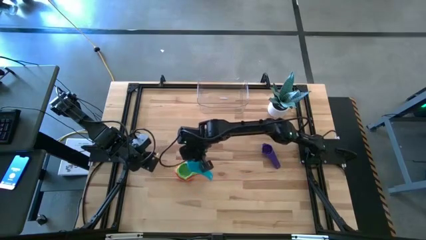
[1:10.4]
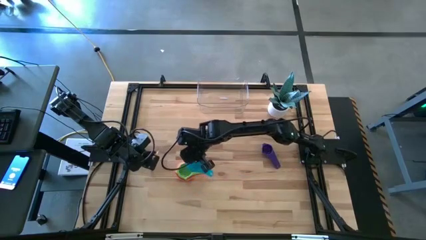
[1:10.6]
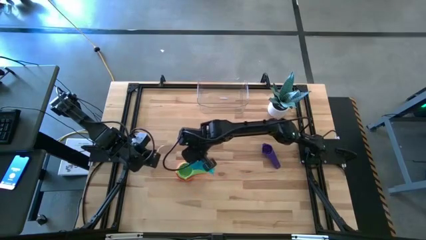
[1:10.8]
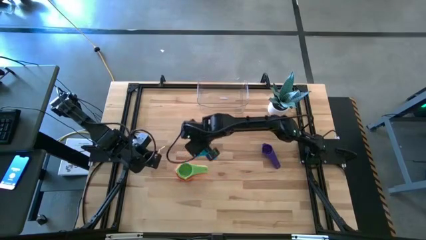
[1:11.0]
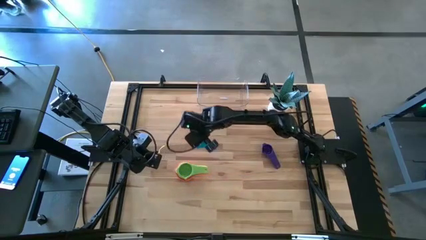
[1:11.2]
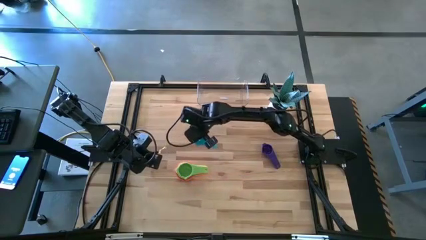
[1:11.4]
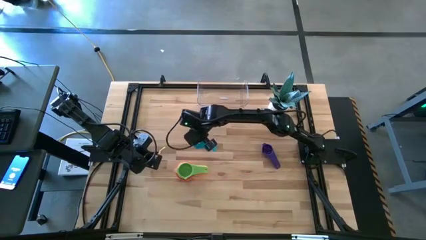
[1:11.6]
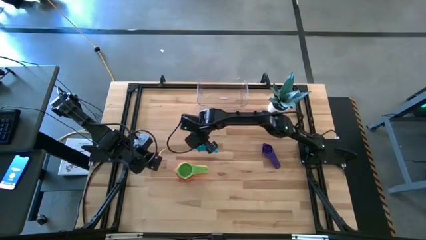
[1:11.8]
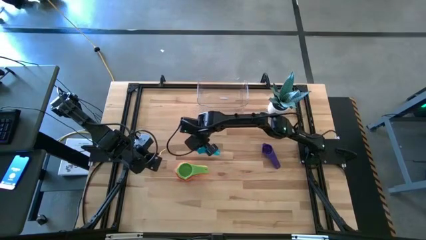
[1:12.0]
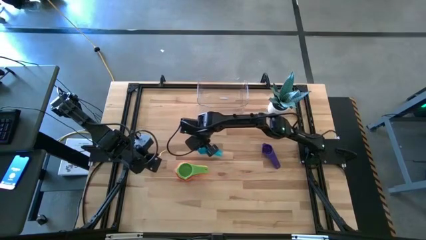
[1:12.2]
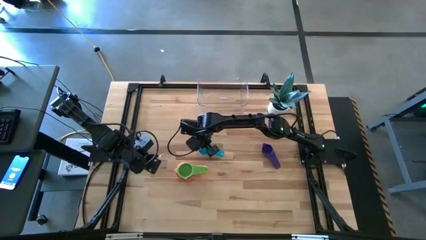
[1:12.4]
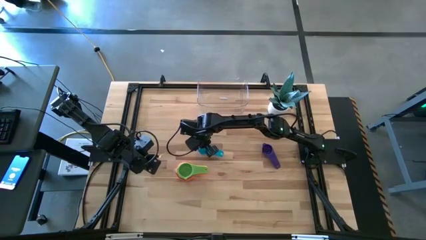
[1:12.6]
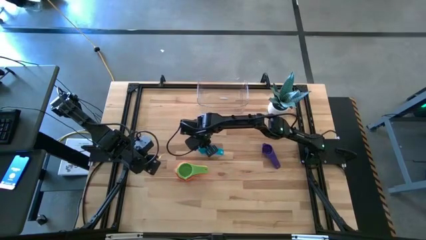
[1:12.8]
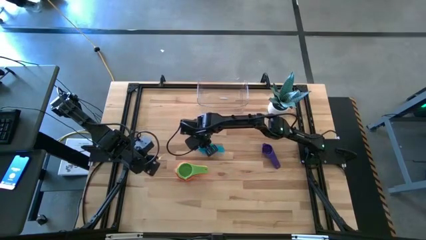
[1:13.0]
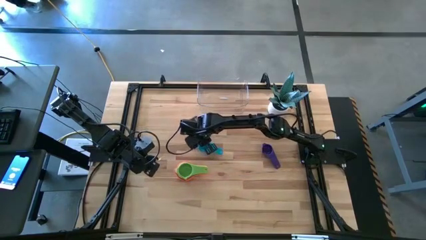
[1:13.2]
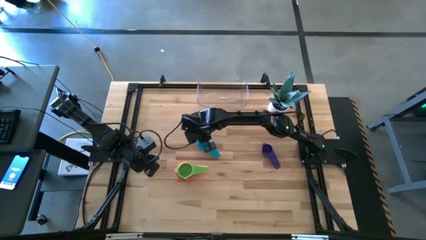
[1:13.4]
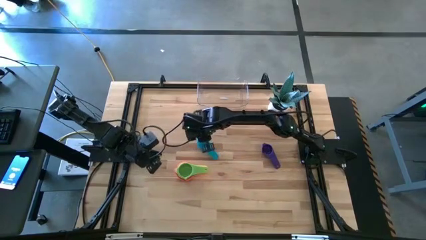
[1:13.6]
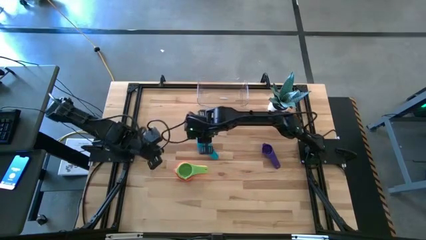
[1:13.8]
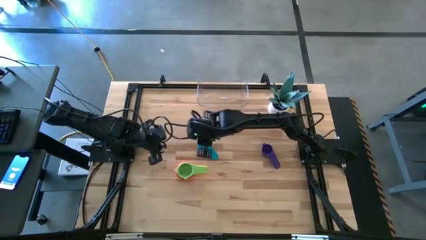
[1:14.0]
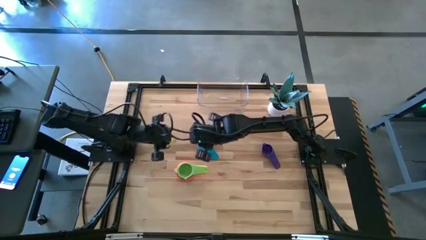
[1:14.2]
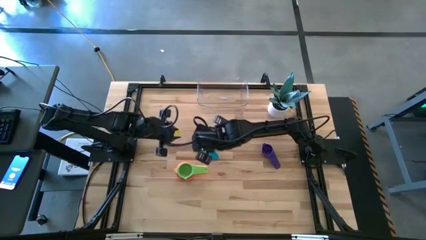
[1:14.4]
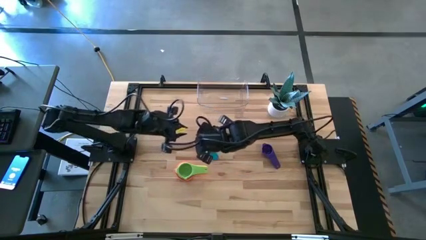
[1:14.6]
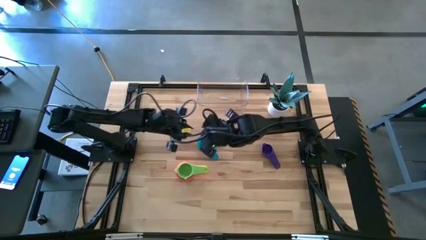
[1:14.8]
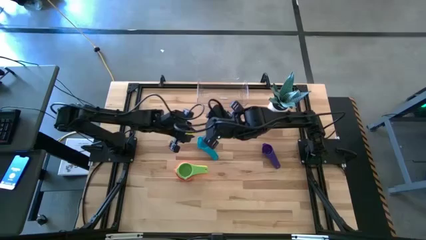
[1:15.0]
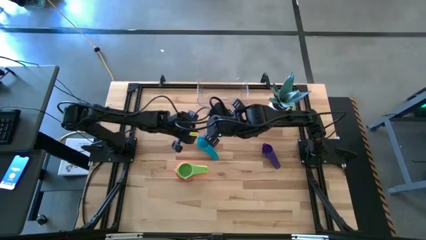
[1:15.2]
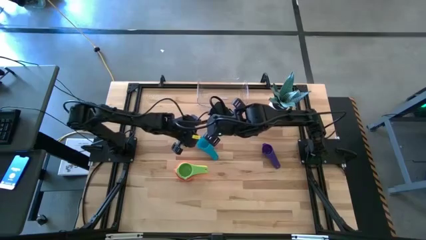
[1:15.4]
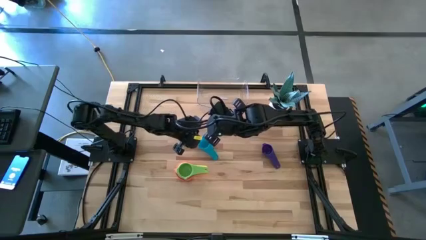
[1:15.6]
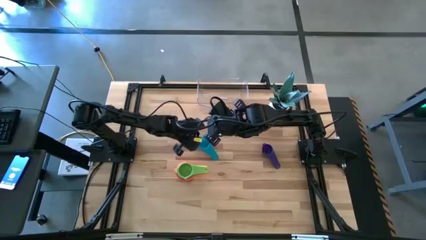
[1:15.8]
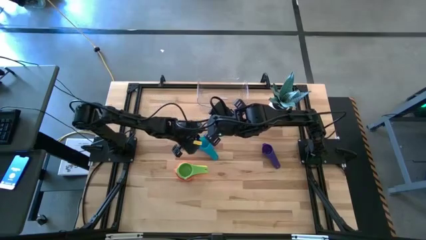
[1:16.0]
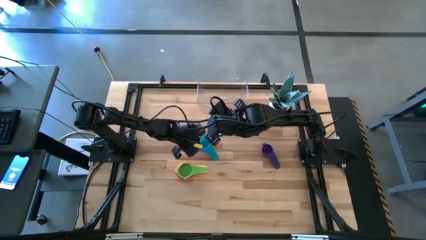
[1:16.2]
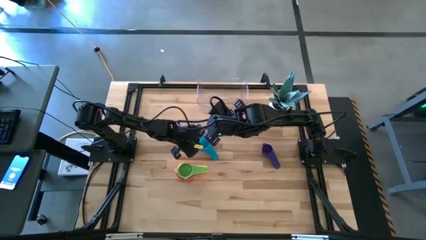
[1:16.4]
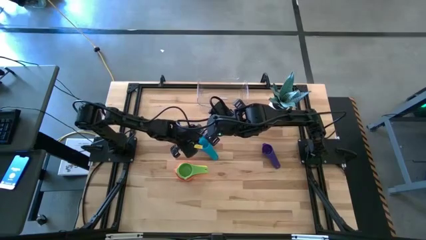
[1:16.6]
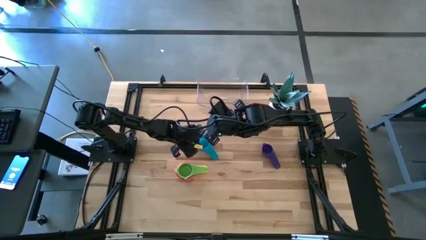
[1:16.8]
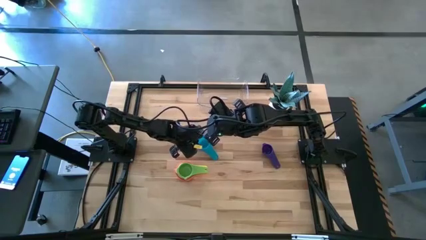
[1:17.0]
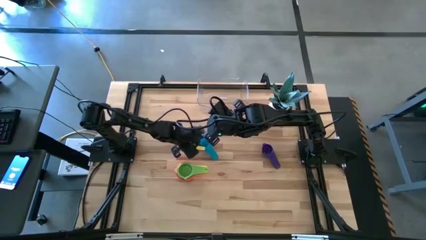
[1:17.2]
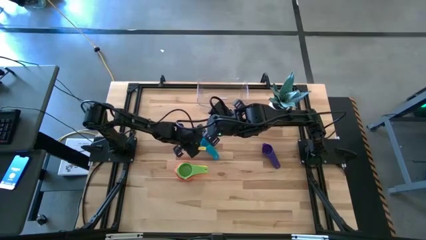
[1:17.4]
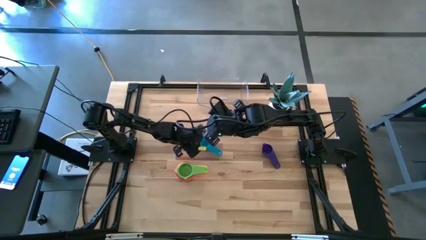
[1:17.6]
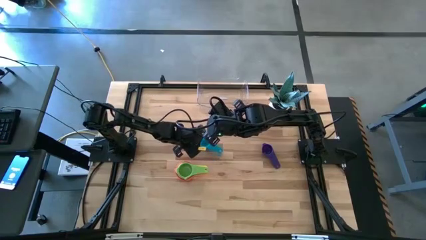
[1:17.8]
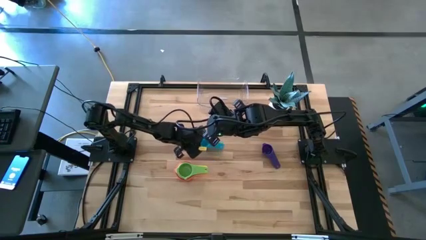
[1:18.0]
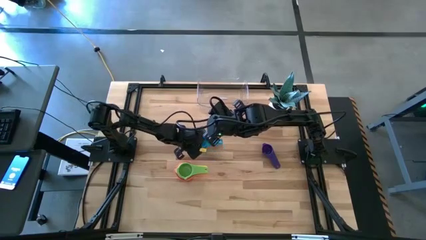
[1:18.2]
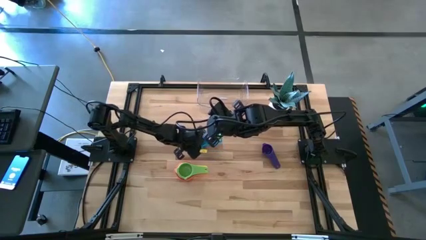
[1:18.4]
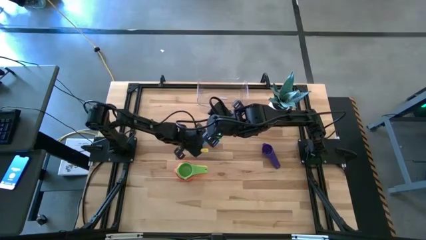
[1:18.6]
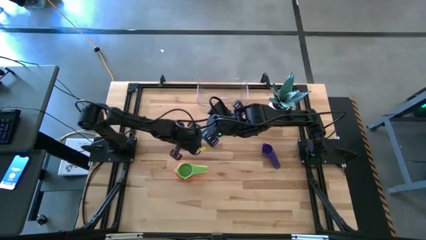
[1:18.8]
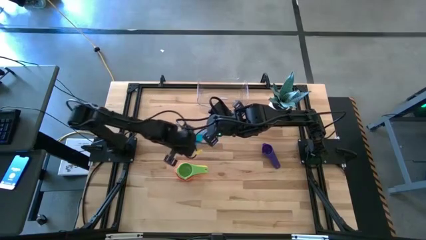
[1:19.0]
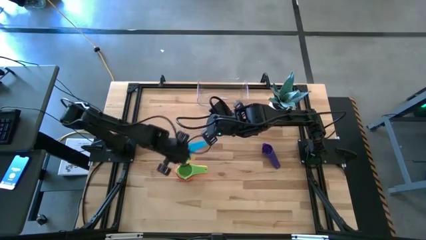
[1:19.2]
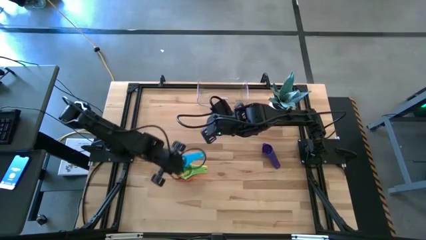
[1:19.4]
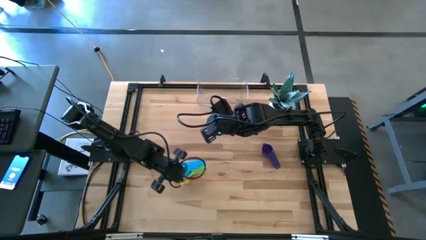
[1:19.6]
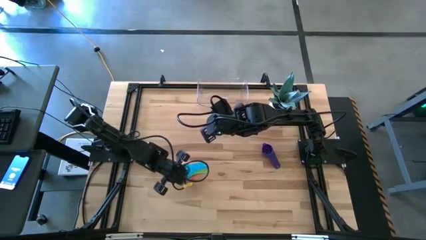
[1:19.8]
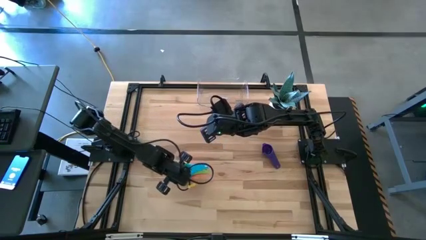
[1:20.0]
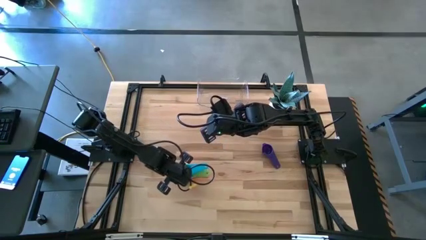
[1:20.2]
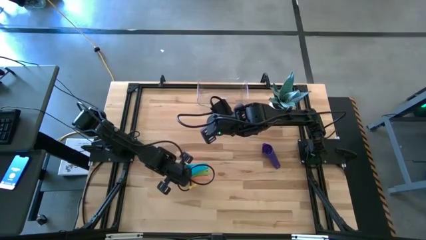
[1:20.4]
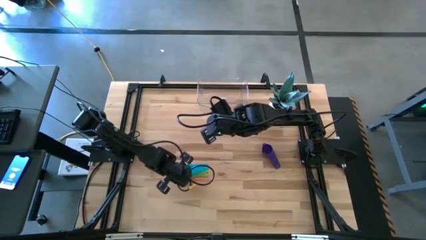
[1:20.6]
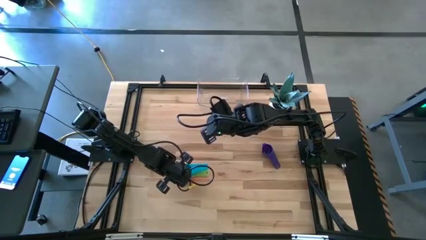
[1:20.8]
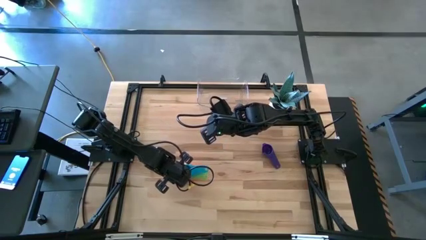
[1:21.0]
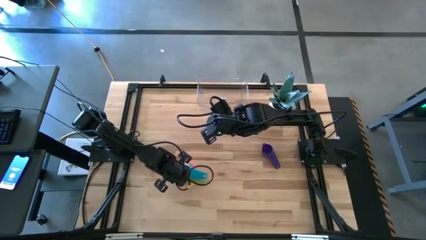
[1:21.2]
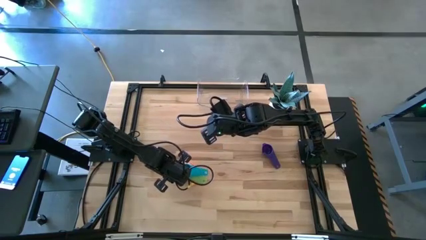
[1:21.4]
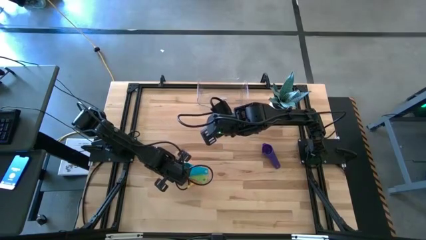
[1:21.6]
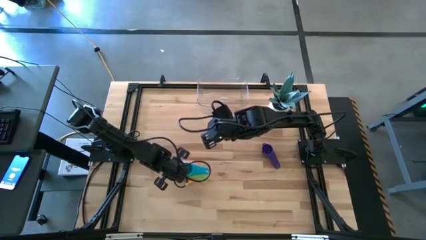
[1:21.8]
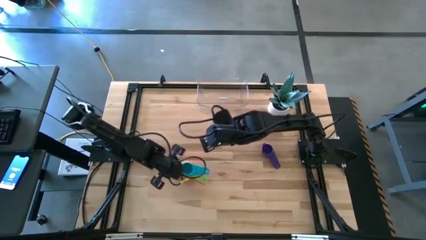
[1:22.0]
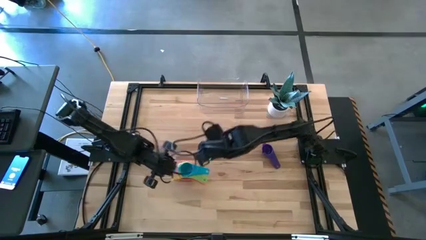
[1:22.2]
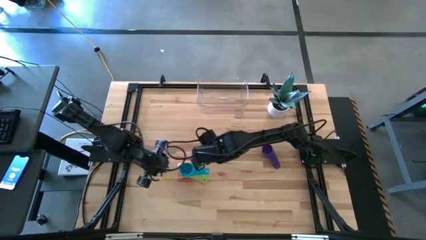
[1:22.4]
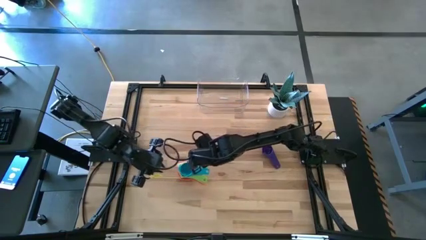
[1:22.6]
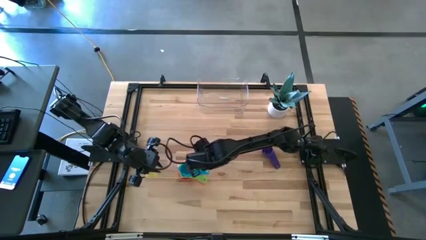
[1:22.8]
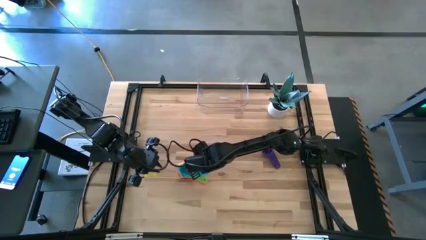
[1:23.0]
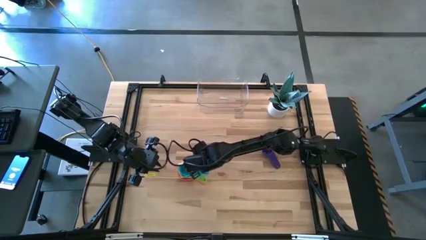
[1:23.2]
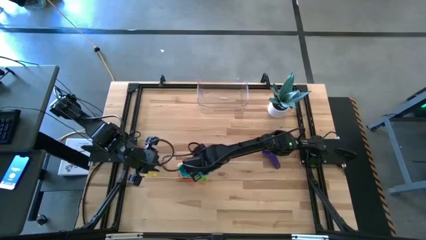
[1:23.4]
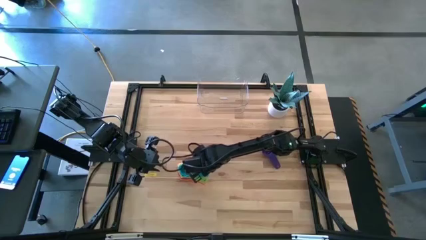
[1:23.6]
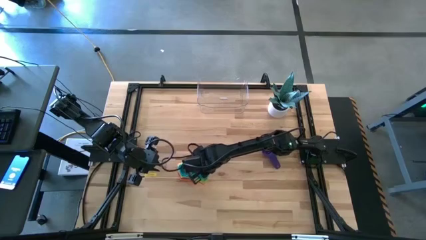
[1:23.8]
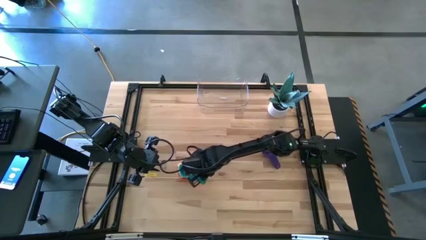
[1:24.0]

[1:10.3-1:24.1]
Task: Nest measuring cups in basket
Stack the light blue measuring cup on top of the light green measuring cup

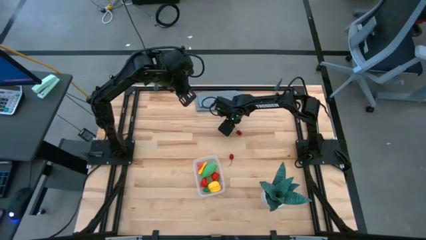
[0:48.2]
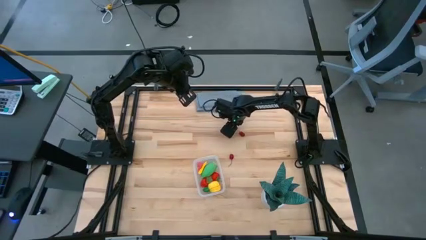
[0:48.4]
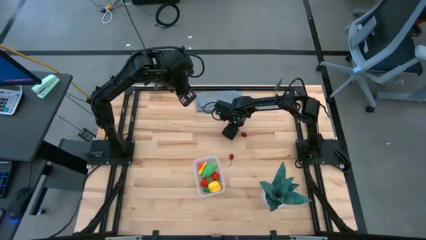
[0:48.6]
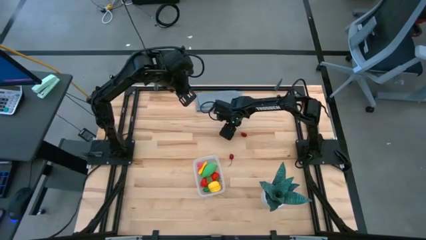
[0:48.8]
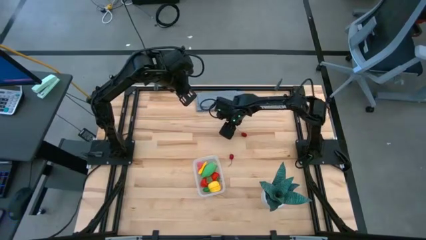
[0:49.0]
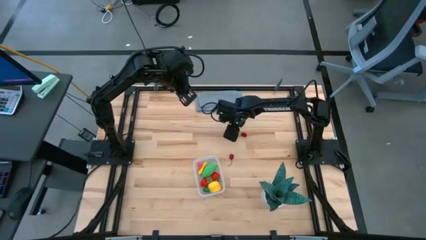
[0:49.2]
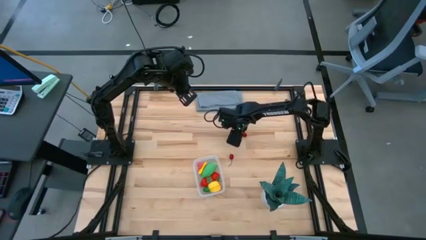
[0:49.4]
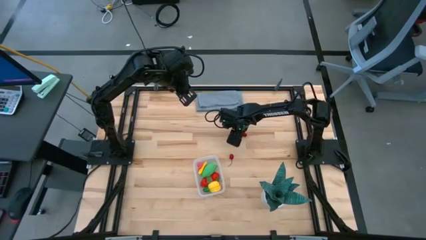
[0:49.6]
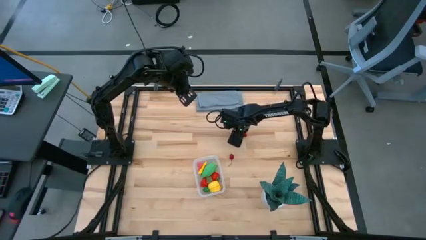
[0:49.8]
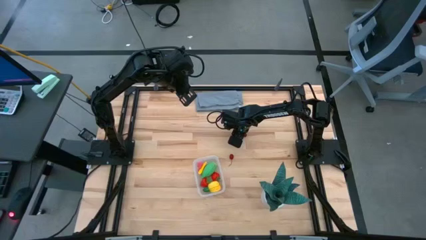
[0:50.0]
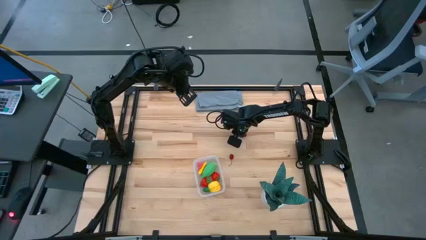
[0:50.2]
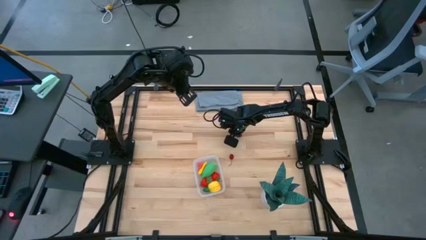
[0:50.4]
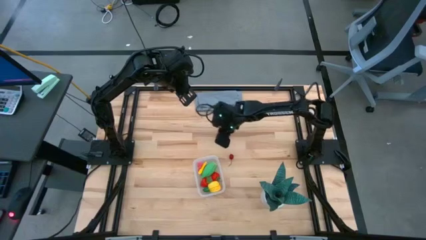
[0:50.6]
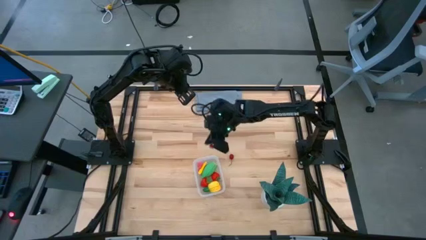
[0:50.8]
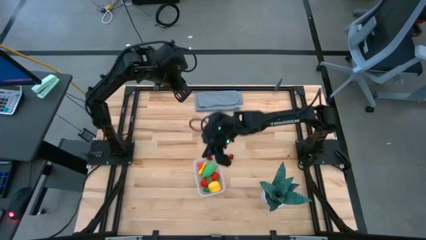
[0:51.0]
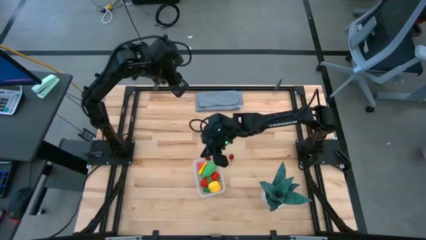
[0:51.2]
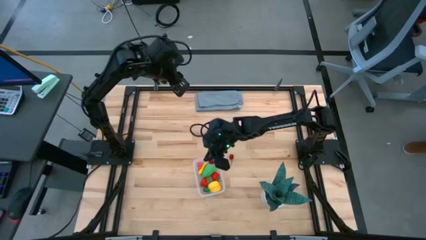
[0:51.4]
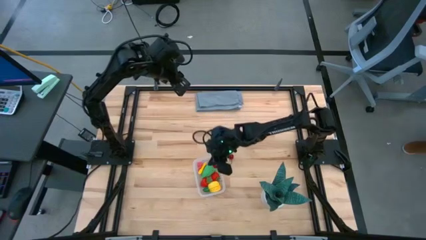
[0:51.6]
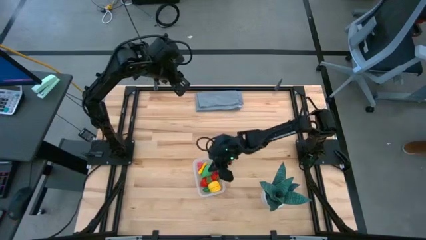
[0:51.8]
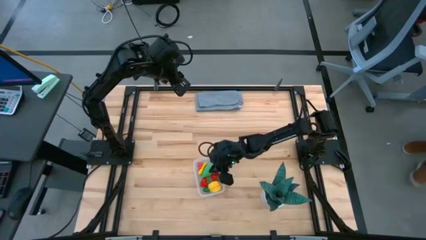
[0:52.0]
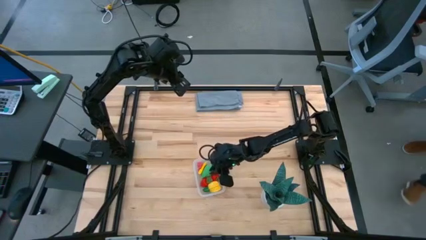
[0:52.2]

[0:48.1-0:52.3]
Task: Pick and placing Produce into tupperware
Put the top cherry into the transparent bin
